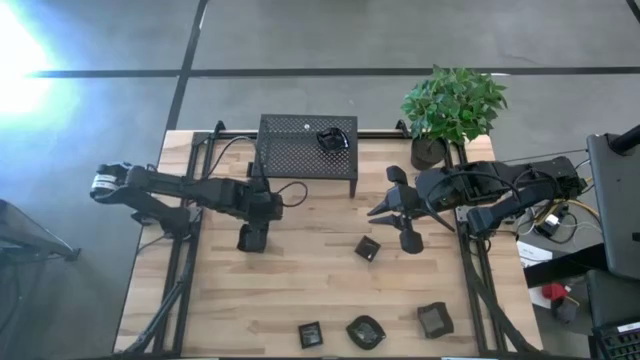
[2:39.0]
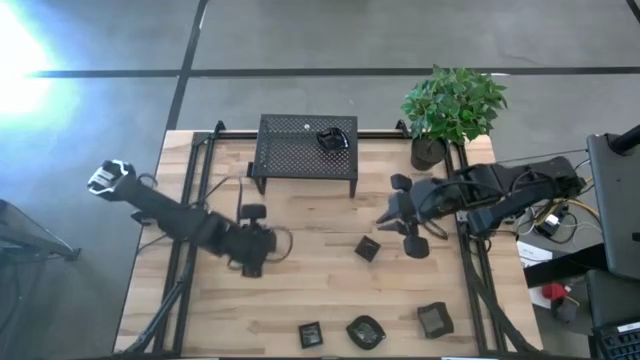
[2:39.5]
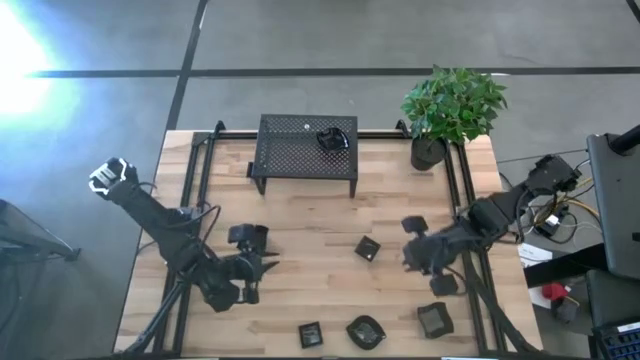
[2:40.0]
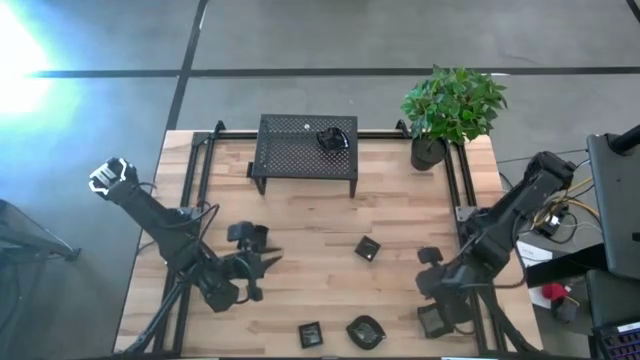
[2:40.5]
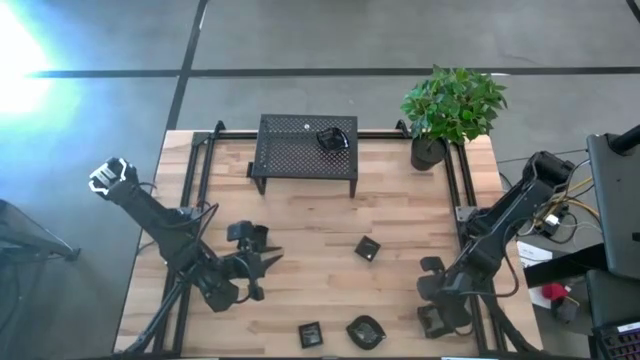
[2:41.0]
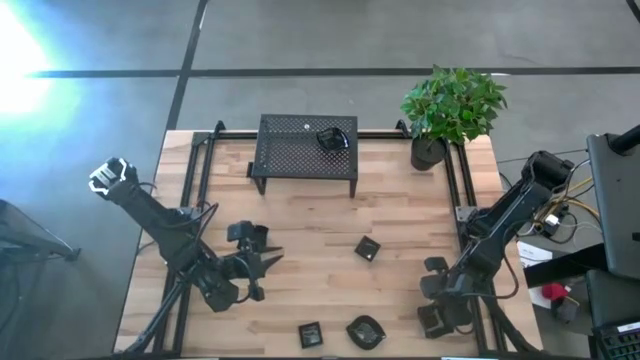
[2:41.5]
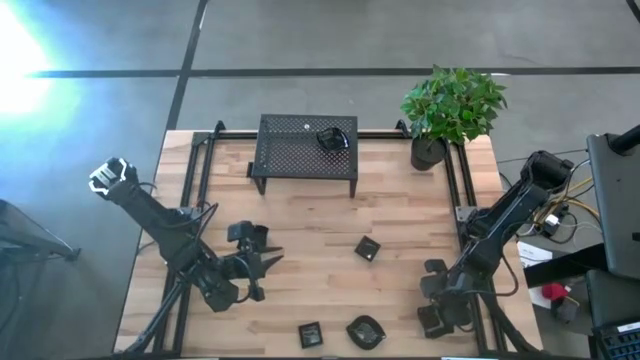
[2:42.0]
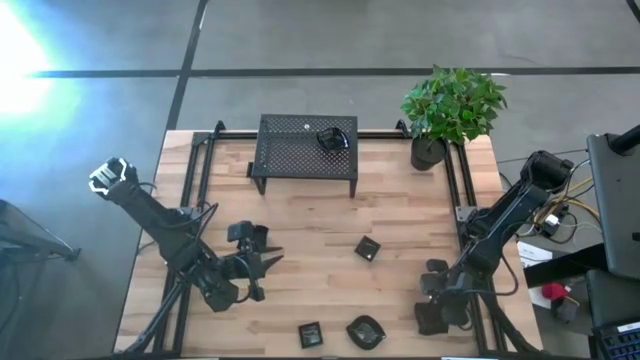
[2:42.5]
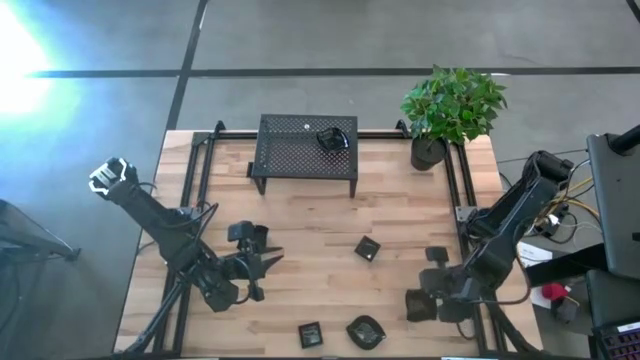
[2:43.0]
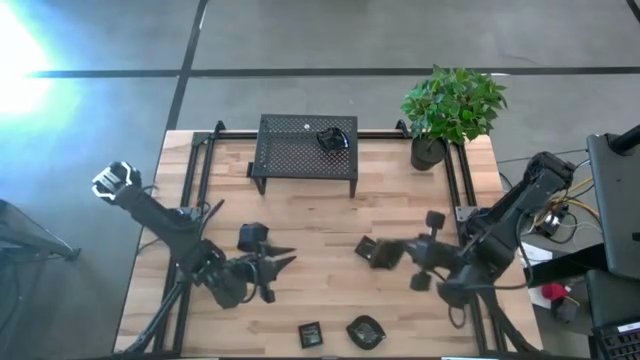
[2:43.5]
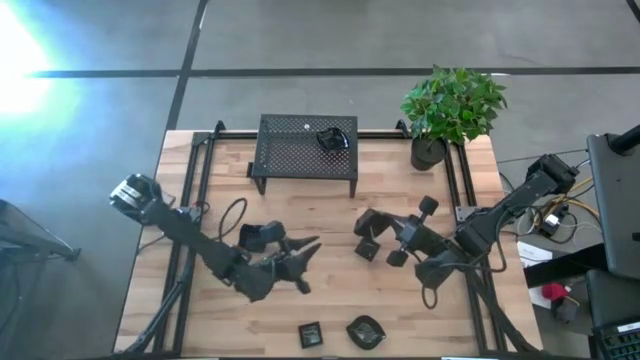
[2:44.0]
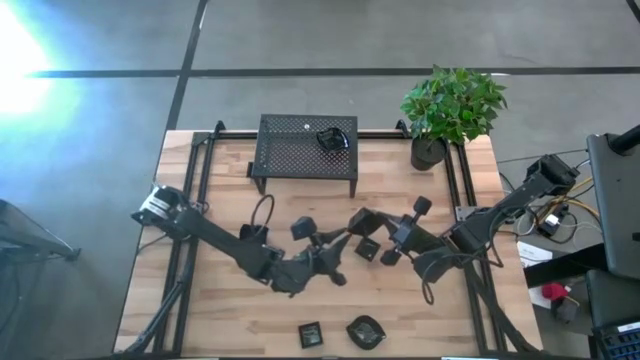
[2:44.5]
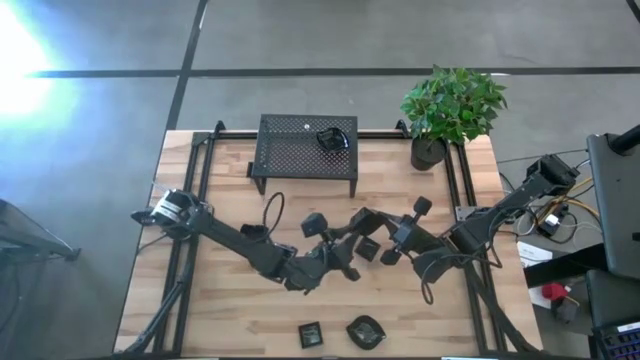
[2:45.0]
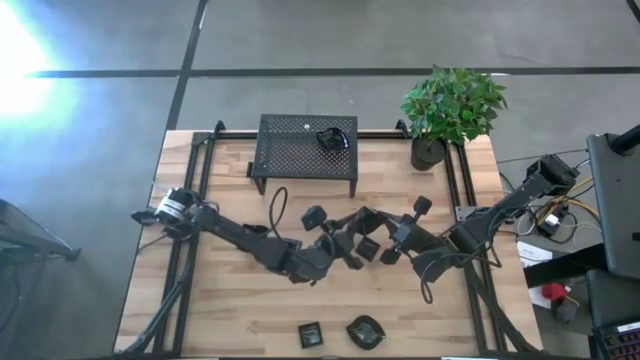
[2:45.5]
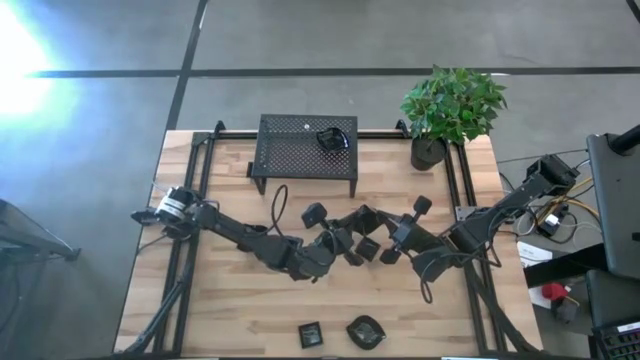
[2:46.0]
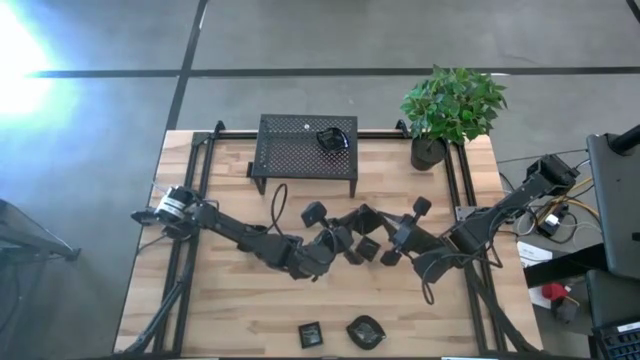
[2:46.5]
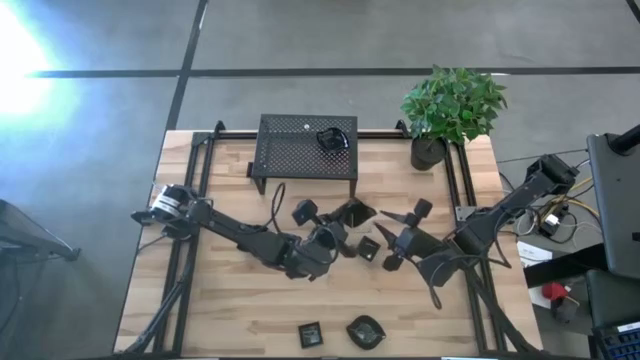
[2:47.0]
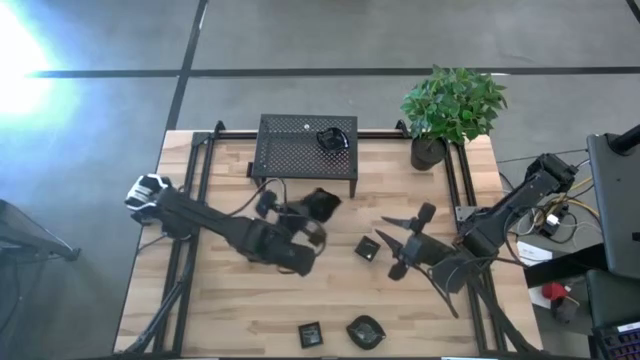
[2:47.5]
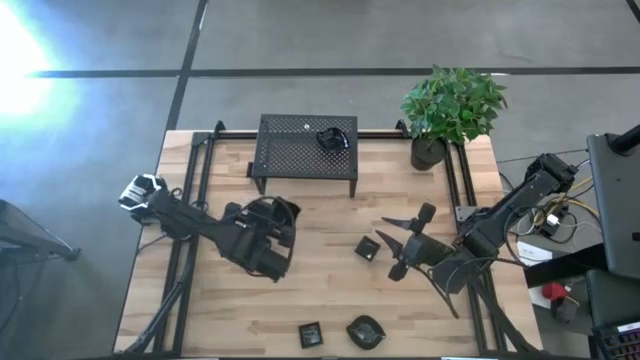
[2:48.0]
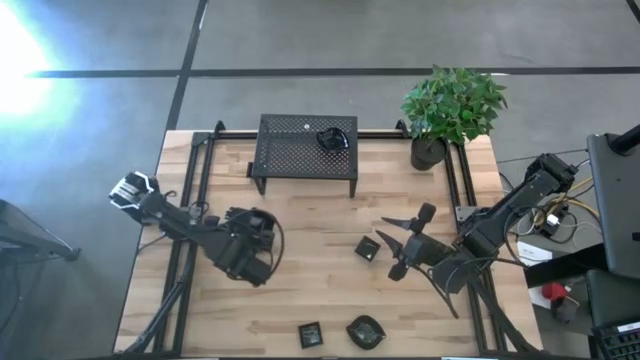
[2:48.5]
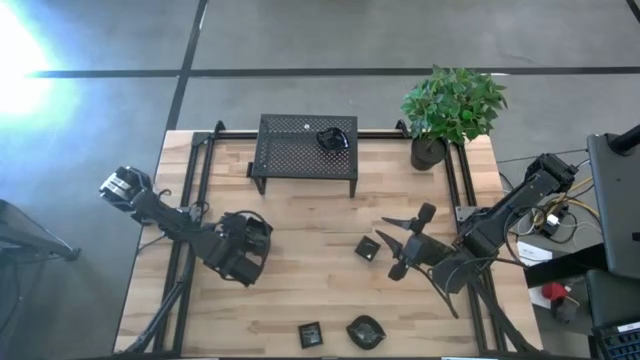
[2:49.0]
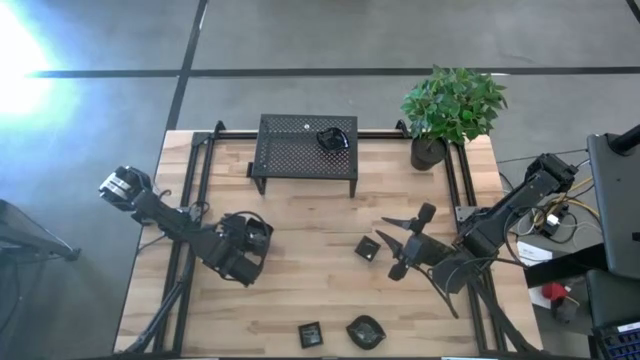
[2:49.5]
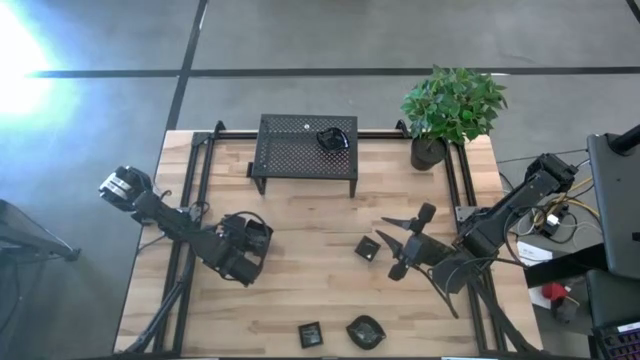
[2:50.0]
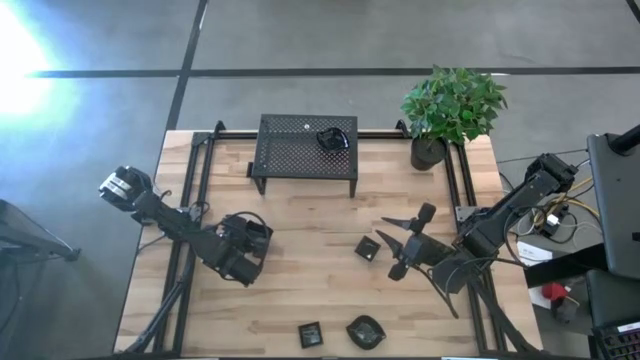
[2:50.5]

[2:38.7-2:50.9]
Task: Pick & Place Mini shaped plates
Stack the black distorted square plate on top of the other black distorted square plate

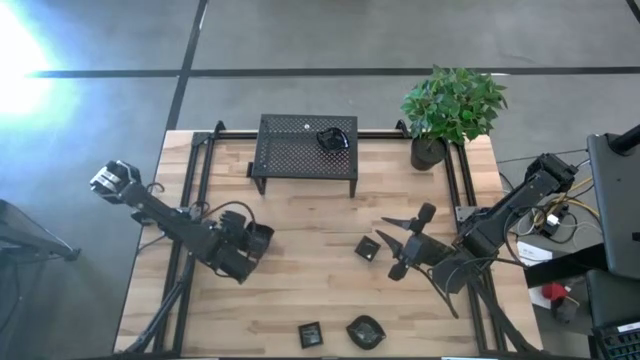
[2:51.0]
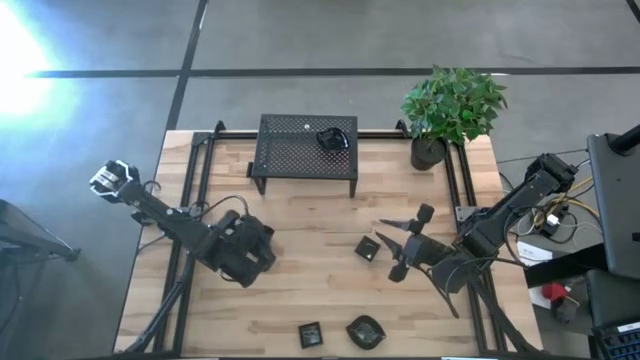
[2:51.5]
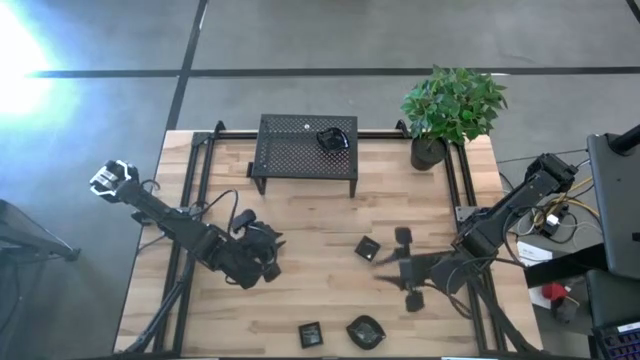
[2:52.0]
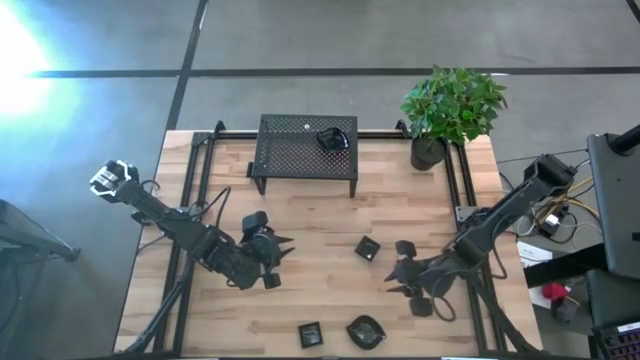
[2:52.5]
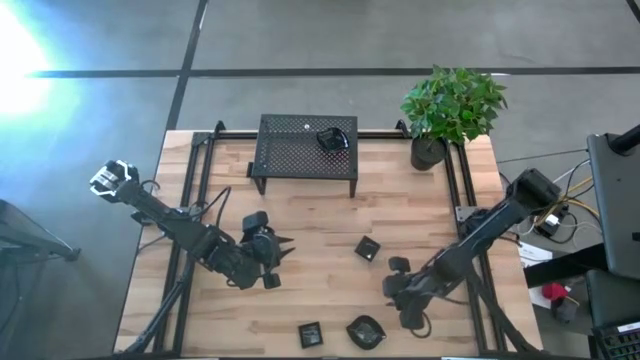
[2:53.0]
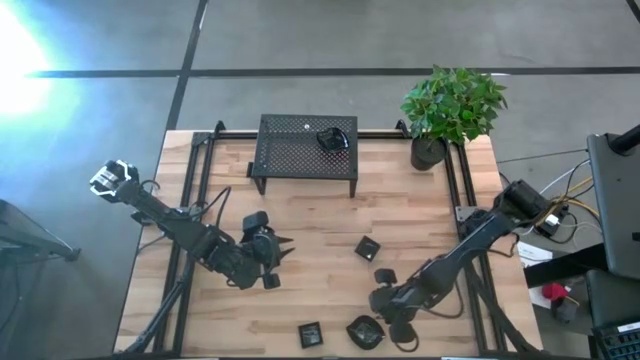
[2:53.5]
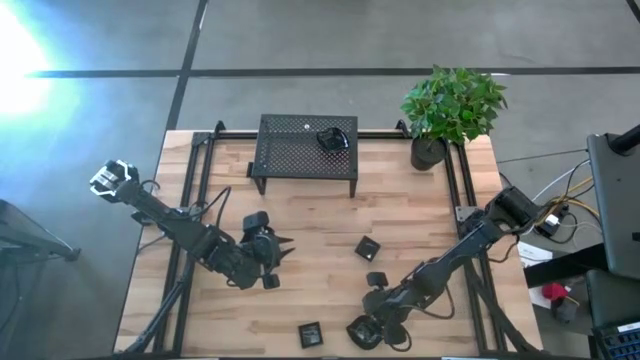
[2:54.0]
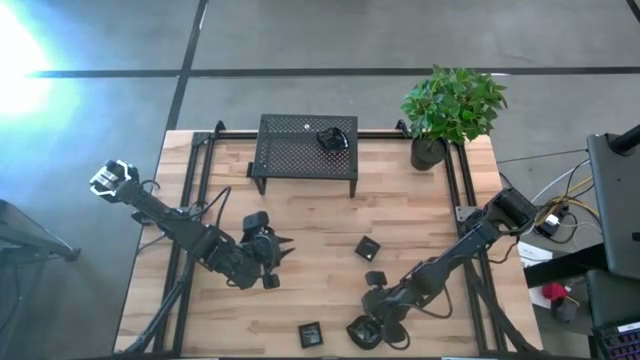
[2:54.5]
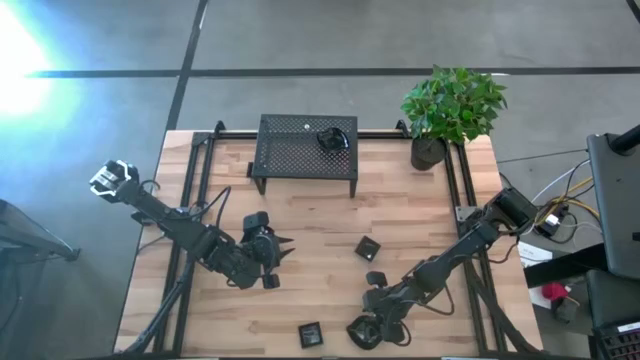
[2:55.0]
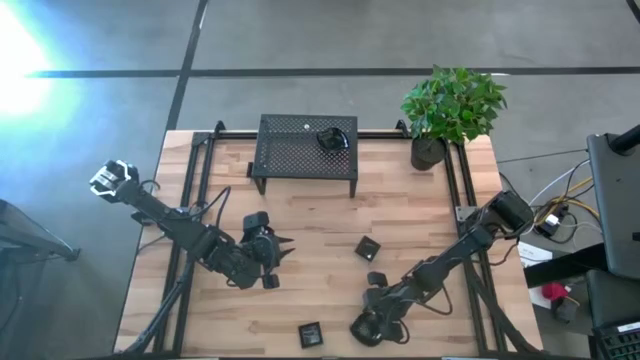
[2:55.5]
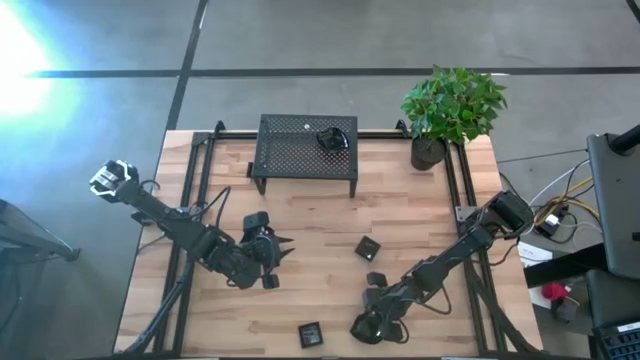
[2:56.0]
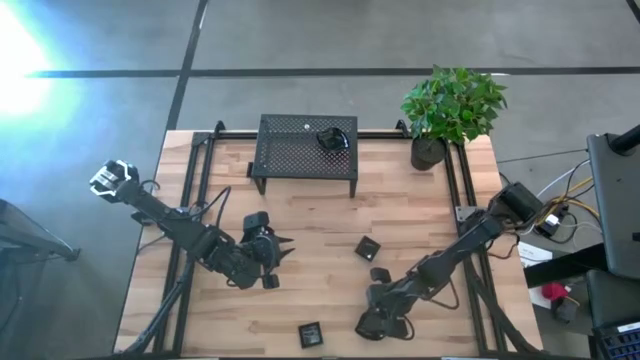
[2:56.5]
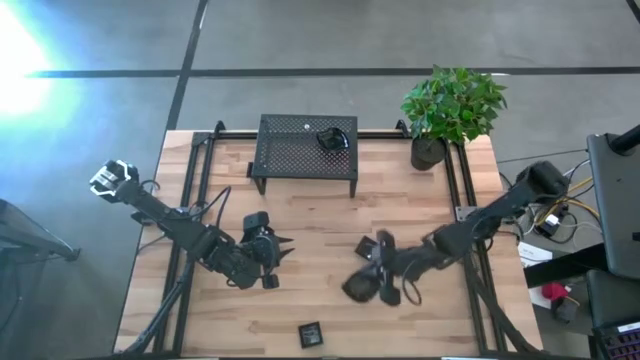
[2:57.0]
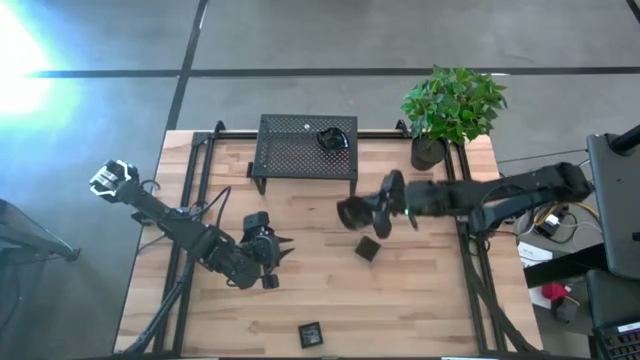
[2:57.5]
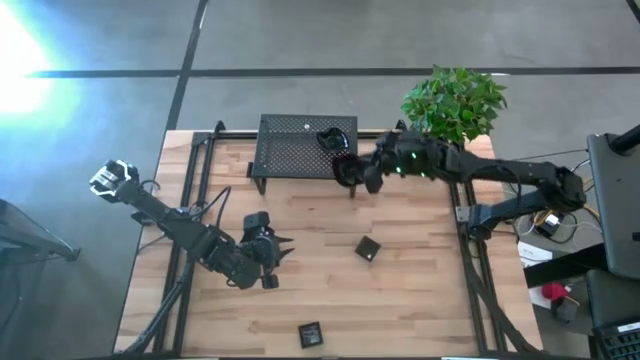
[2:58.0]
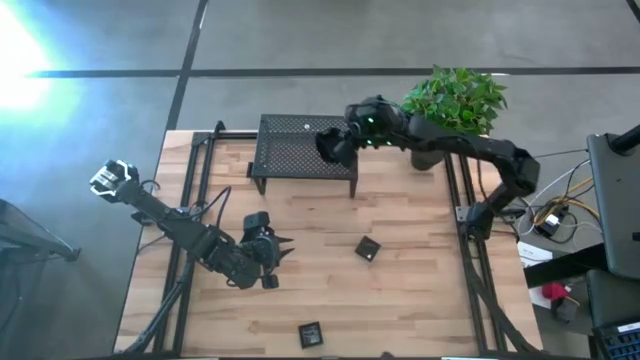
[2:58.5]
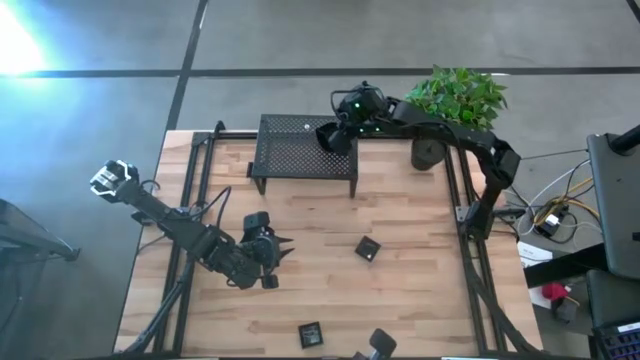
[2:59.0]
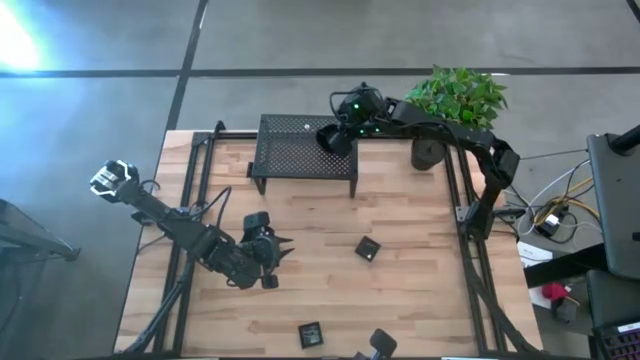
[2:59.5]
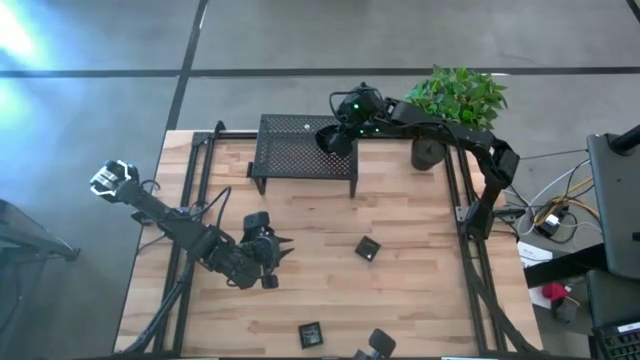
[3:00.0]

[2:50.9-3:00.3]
Stack the black leaf shaped plate on top of the other black leaf shaped plate on the shelf
